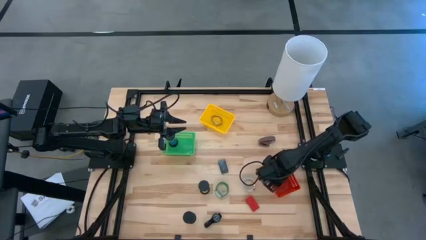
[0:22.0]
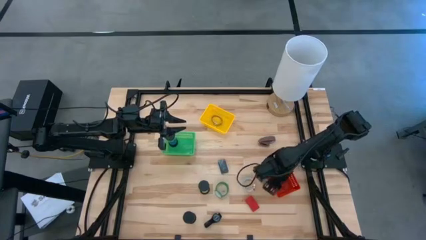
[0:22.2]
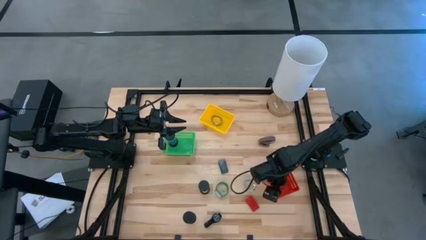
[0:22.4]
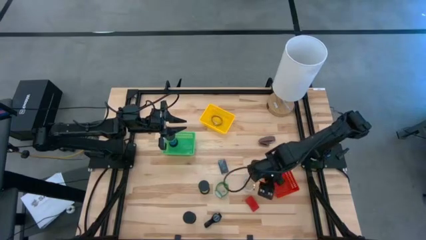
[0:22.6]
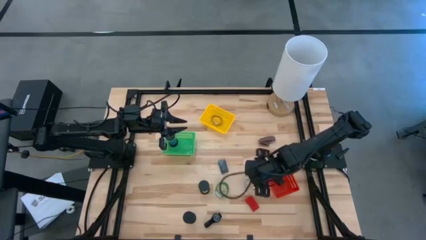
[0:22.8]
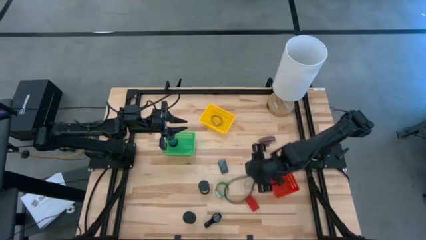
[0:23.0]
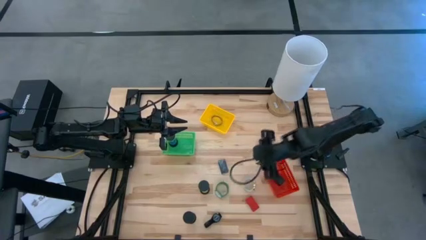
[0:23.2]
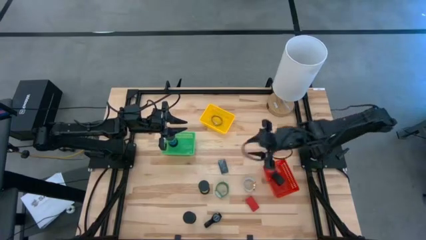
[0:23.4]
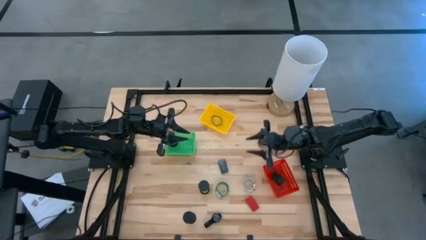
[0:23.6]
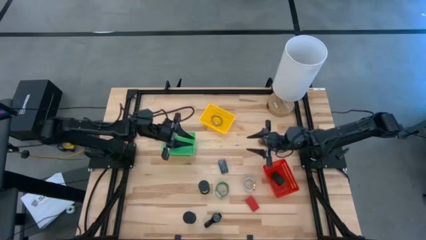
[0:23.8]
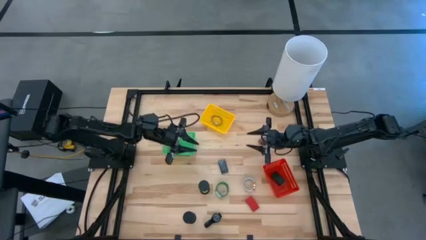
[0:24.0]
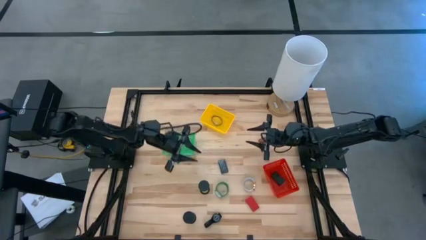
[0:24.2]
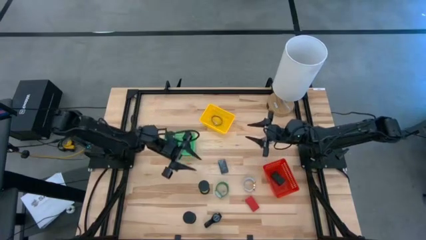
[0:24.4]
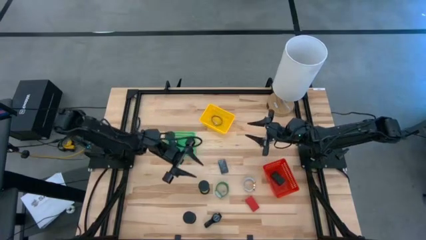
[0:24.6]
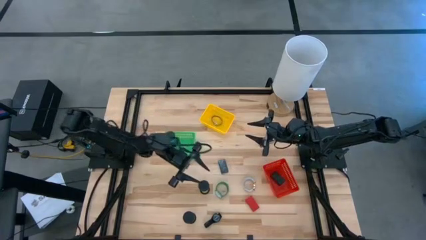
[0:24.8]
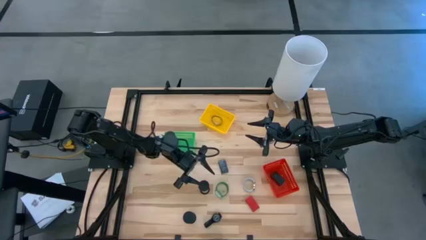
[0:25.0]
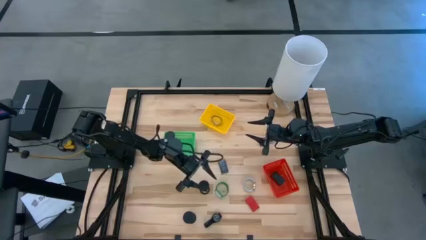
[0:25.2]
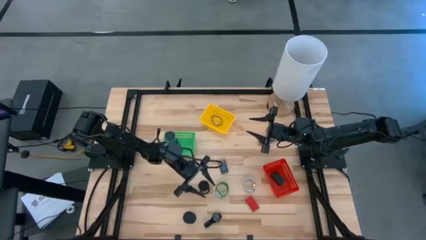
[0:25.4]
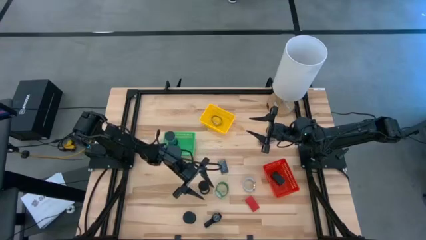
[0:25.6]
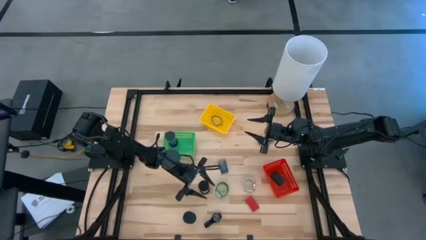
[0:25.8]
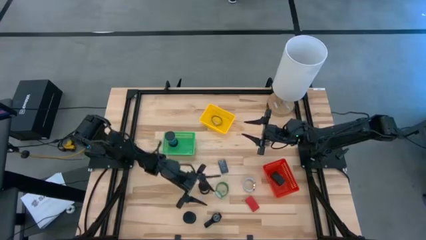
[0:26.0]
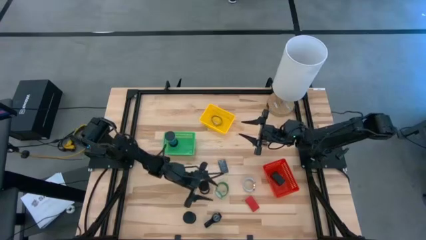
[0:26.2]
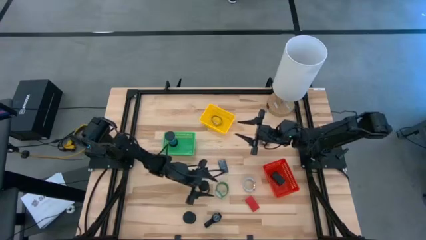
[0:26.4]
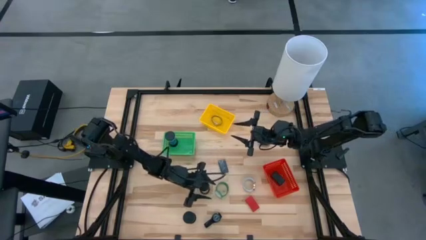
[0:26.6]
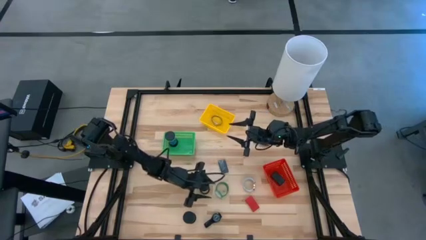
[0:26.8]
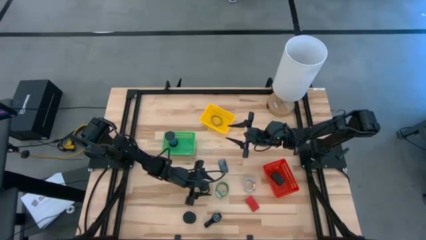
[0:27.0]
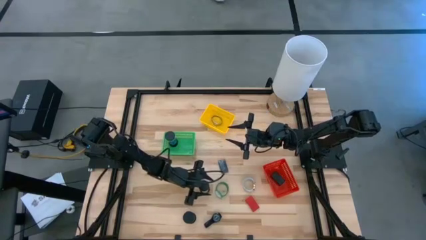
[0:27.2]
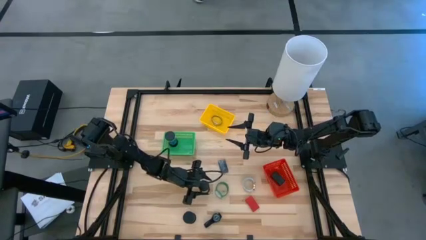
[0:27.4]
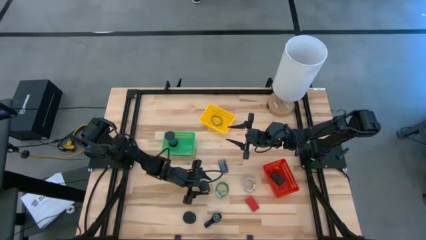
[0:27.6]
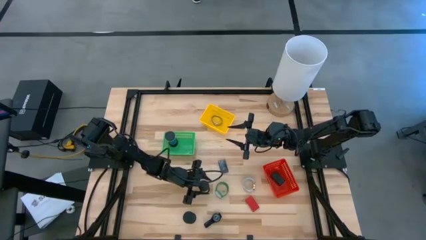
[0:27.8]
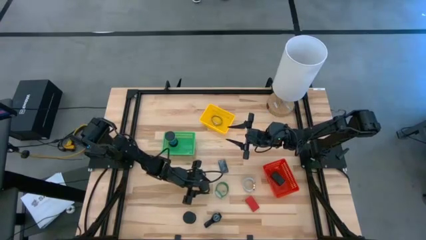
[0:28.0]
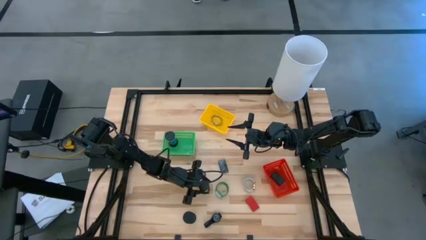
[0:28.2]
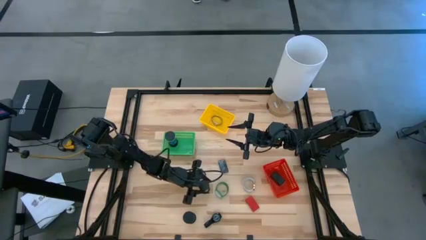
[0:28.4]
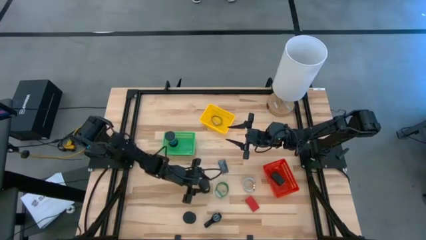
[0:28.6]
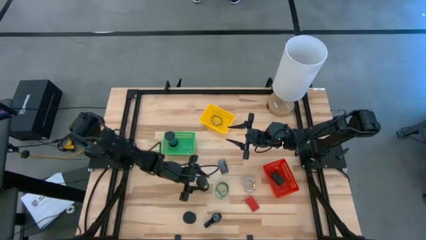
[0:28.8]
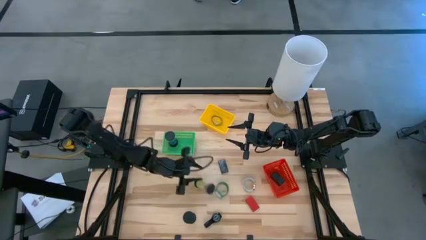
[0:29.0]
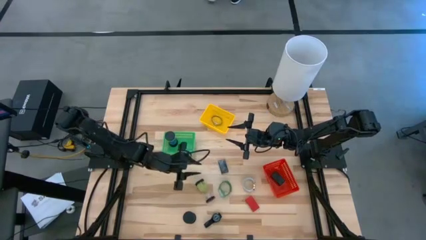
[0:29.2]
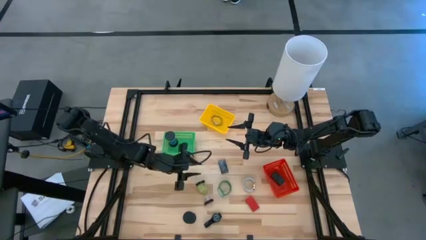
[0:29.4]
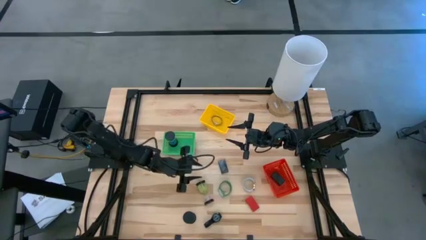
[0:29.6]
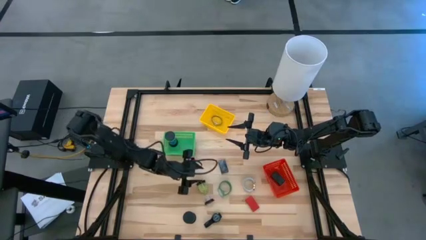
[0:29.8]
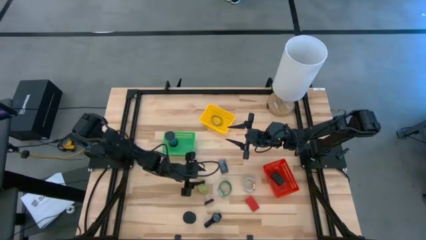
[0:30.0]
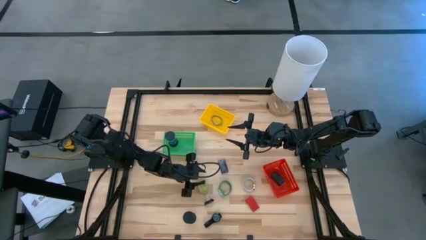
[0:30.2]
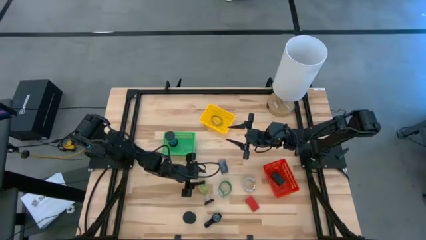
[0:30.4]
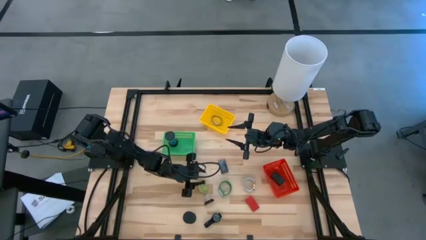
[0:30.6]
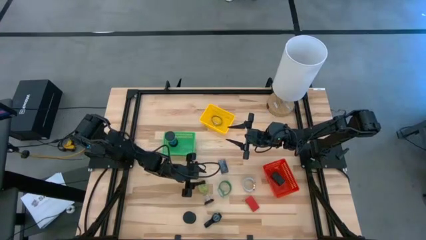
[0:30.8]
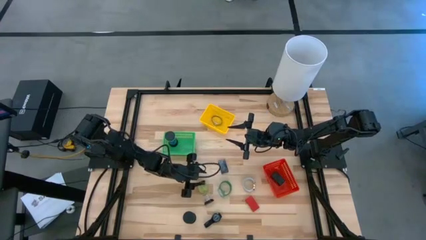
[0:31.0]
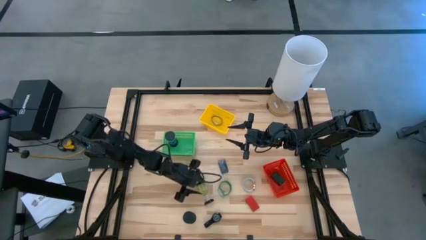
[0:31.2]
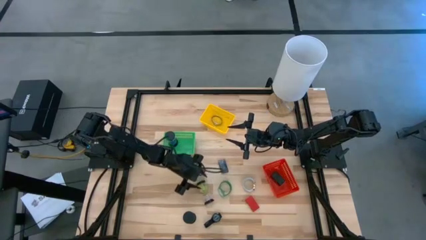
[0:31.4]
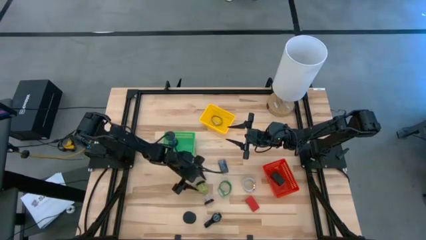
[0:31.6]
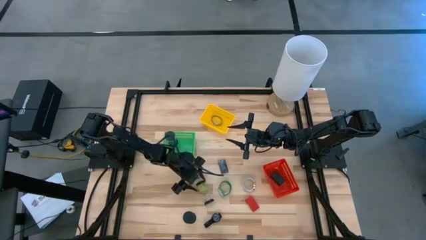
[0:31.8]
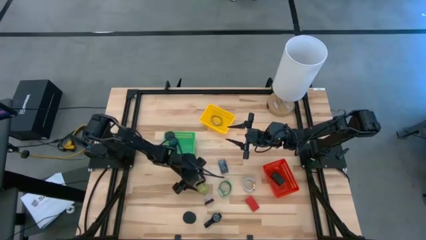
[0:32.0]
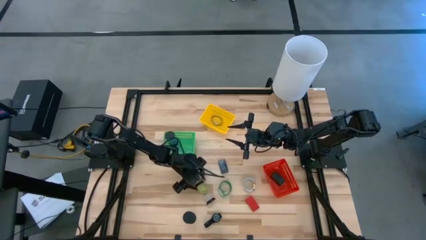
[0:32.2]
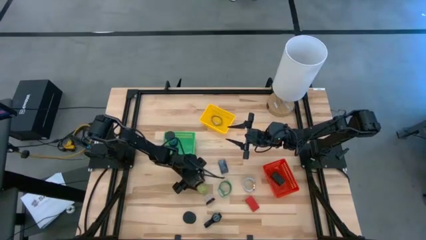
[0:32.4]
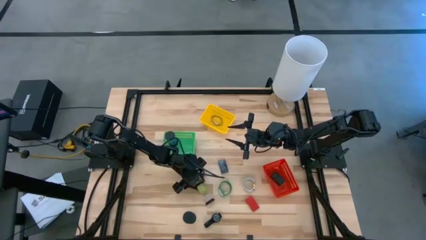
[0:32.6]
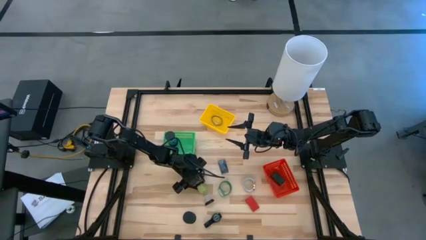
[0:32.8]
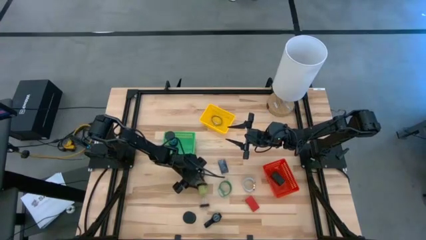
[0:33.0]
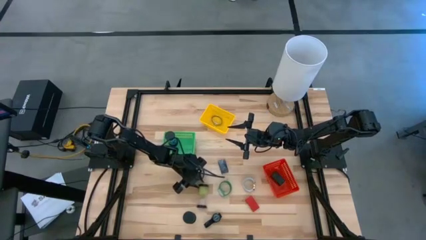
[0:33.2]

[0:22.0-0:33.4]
Task: Pick & Place Office items
Put the top green hourglass into the green basket
